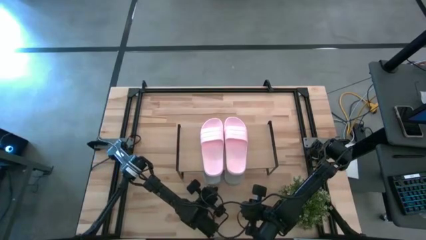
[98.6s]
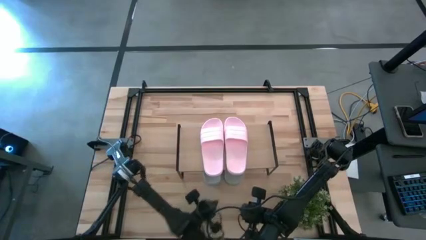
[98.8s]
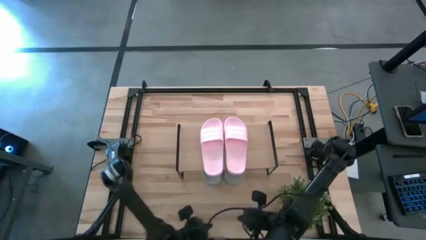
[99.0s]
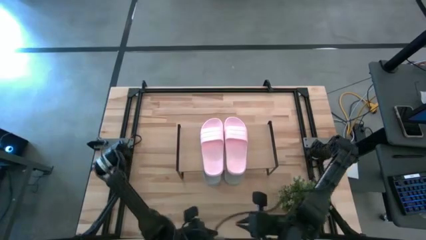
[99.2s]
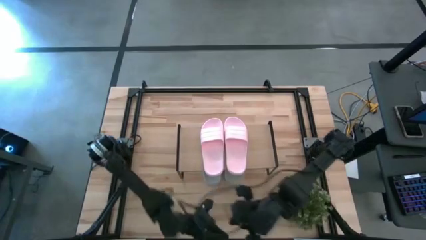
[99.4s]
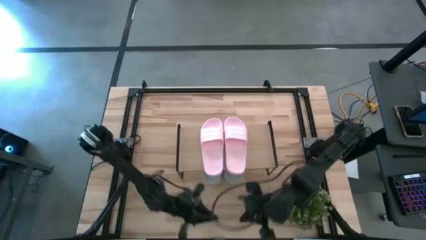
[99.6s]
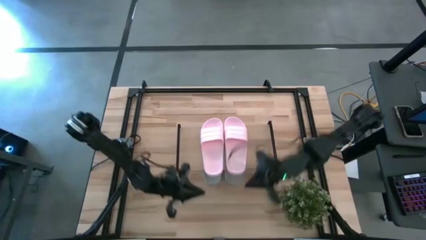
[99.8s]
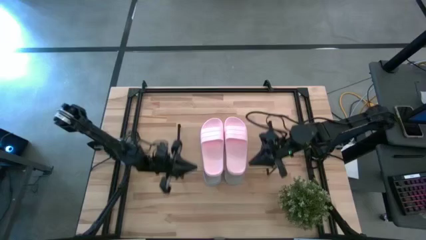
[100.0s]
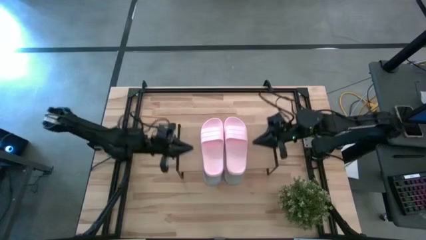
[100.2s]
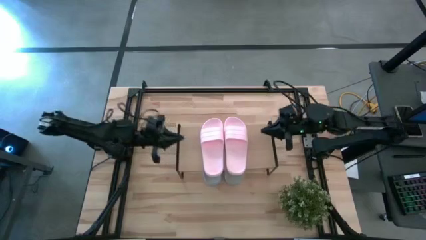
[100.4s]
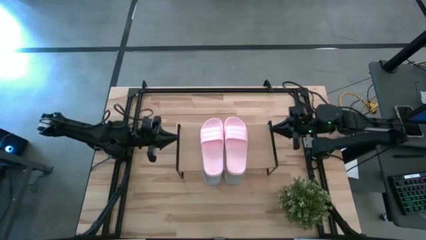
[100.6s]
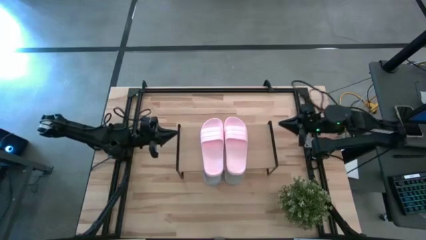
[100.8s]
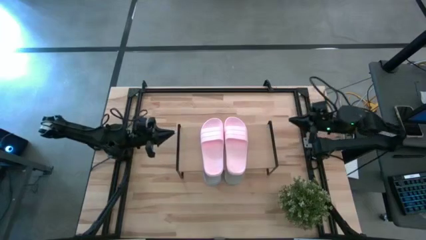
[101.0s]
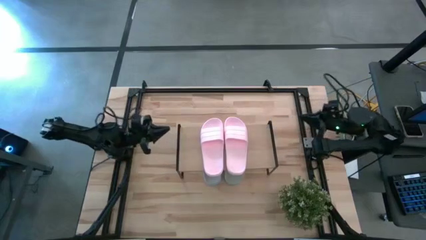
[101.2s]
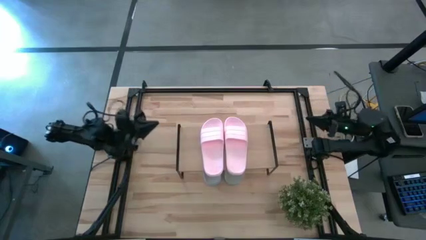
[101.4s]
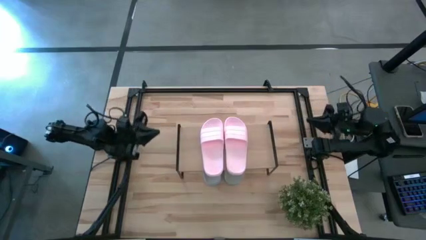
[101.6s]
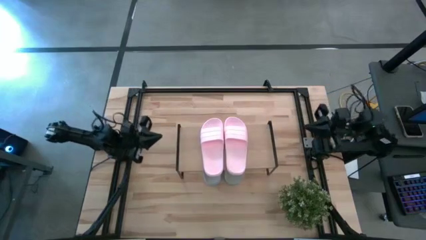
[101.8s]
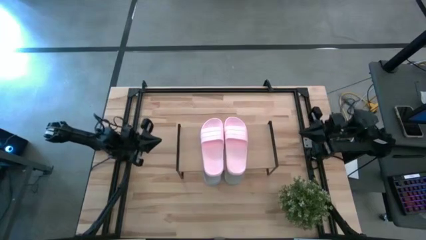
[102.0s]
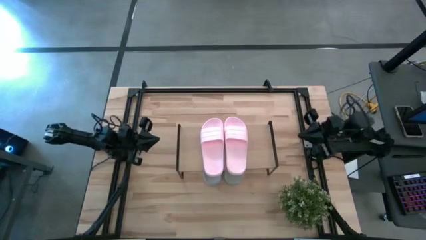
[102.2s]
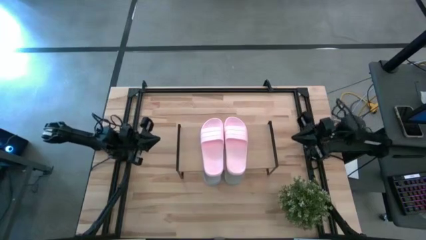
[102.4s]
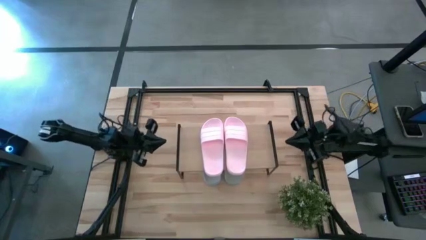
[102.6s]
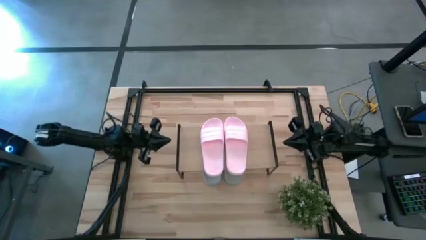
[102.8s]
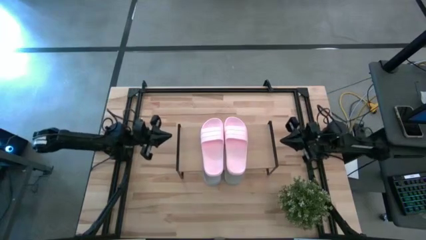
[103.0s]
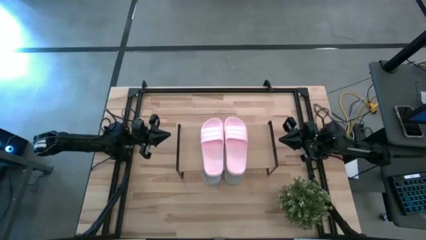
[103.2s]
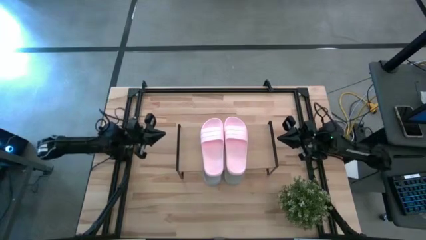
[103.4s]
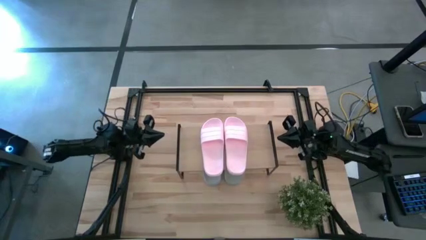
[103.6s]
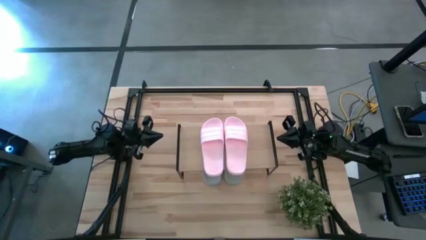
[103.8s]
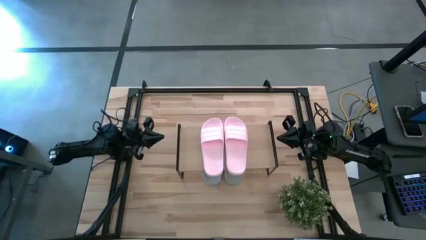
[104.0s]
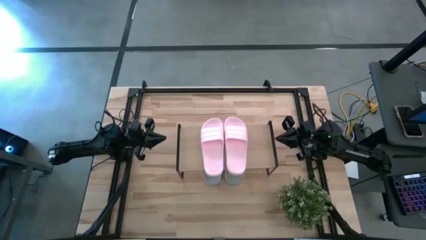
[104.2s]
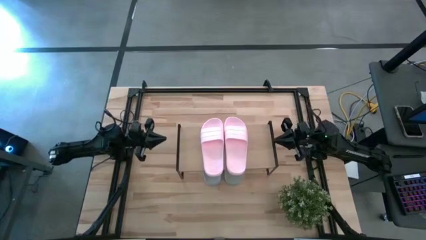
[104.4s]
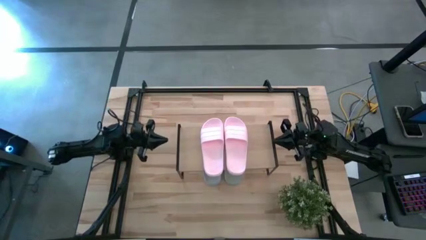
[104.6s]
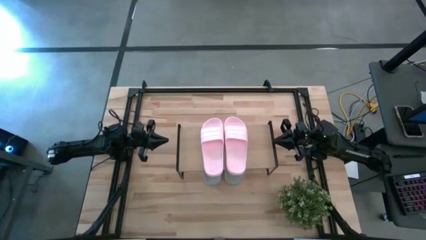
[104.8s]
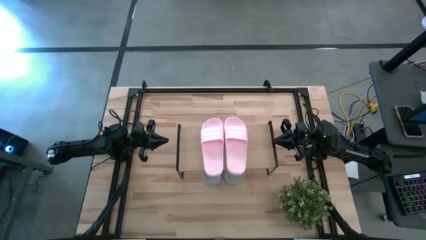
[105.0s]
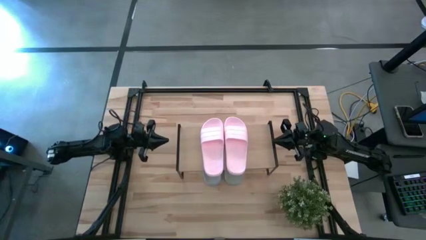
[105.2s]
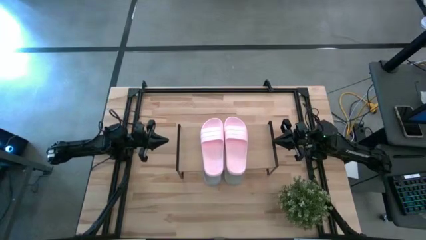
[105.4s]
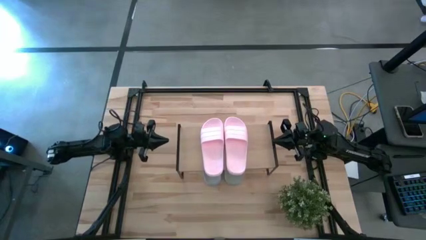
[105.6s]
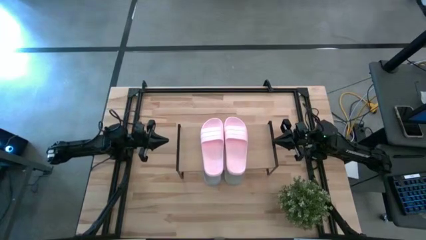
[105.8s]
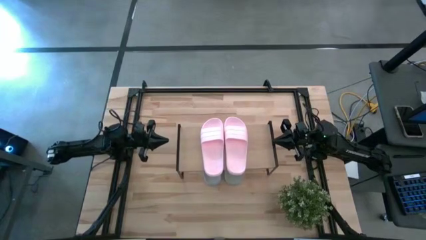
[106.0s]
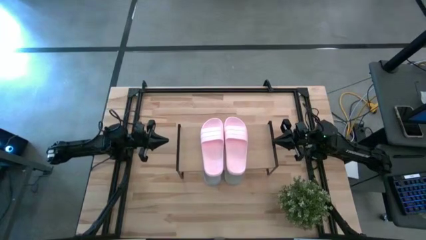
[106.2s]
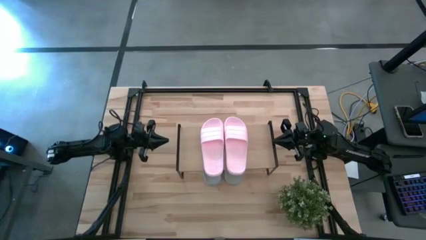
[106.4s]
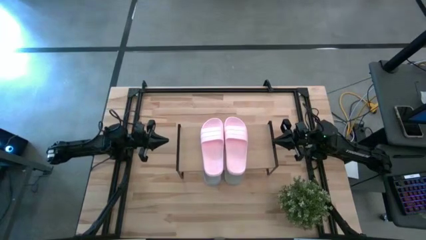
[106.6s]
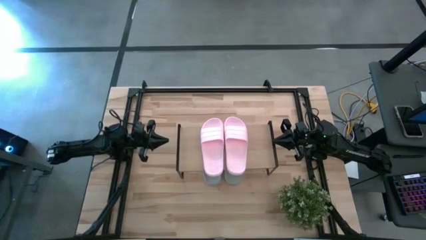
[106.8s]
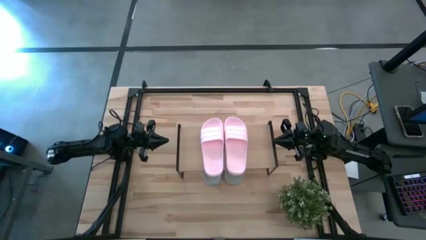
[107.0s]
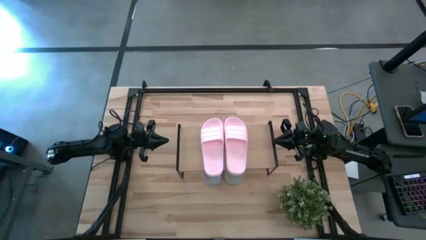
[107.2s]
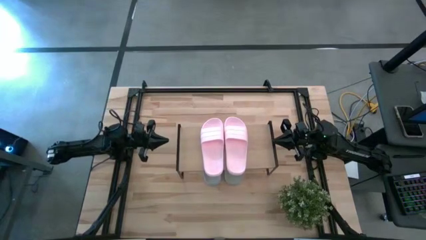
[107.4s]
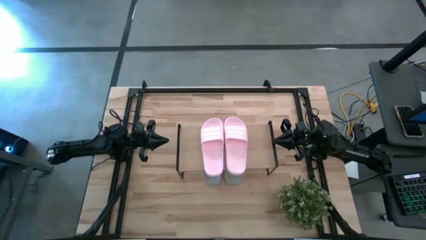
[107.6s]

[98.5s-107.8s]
Task: Pick and place slides into the shelf
Return to Home Position
